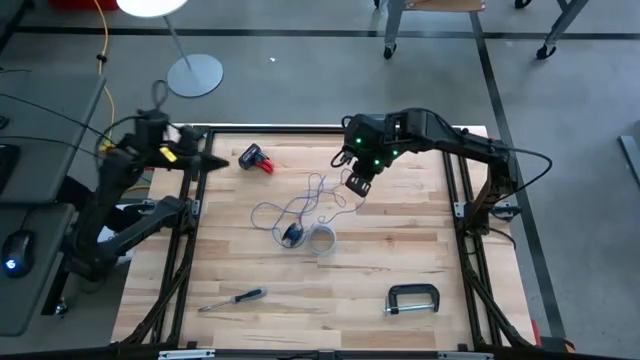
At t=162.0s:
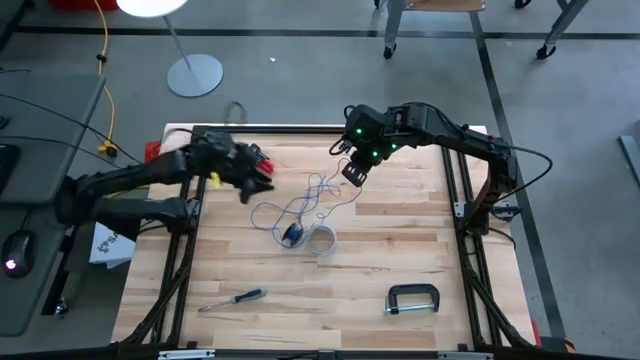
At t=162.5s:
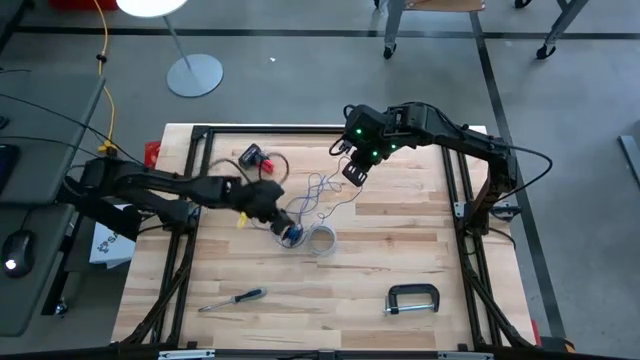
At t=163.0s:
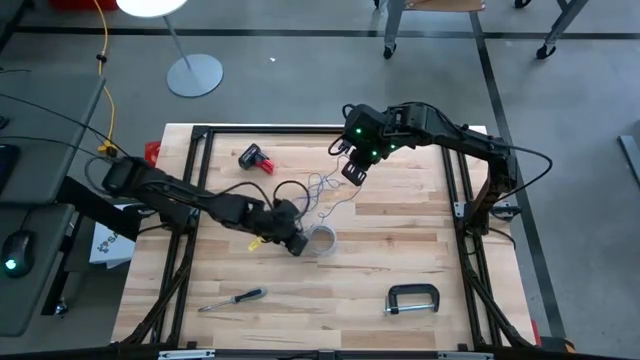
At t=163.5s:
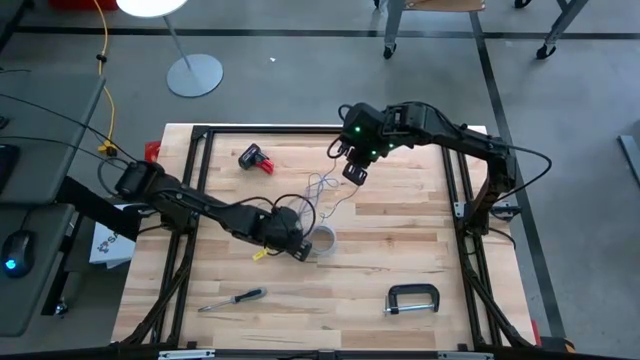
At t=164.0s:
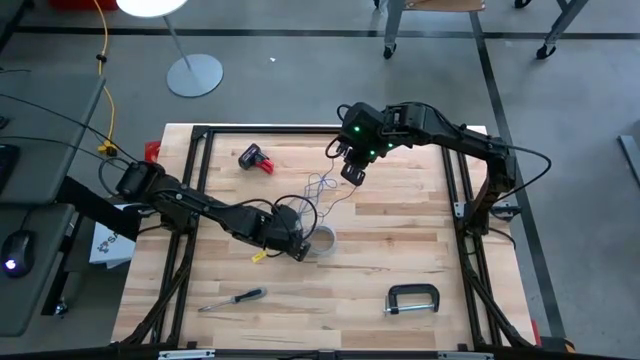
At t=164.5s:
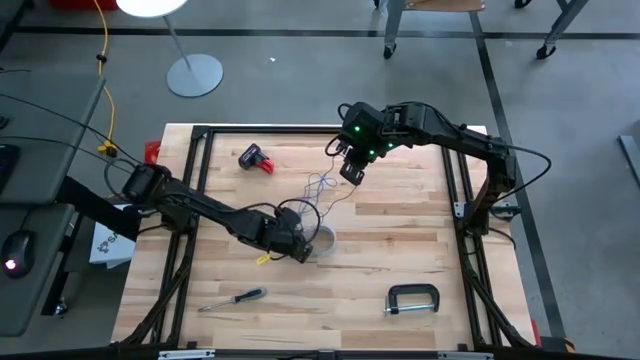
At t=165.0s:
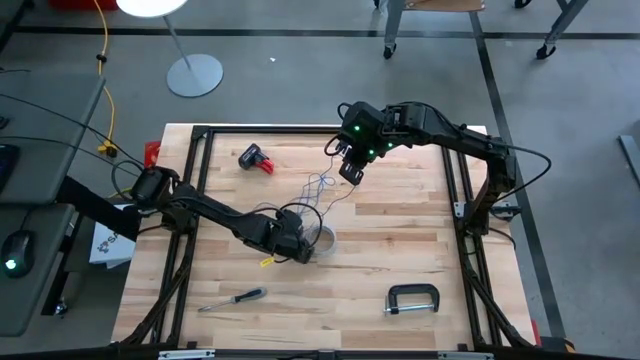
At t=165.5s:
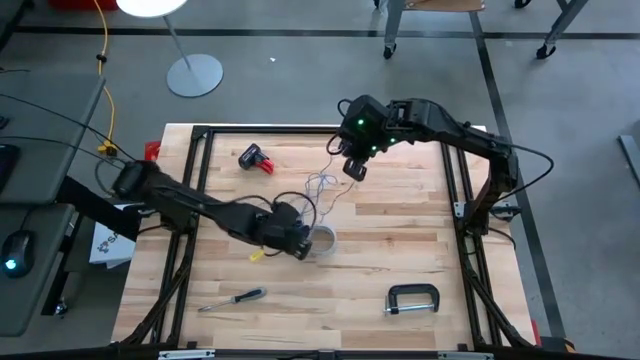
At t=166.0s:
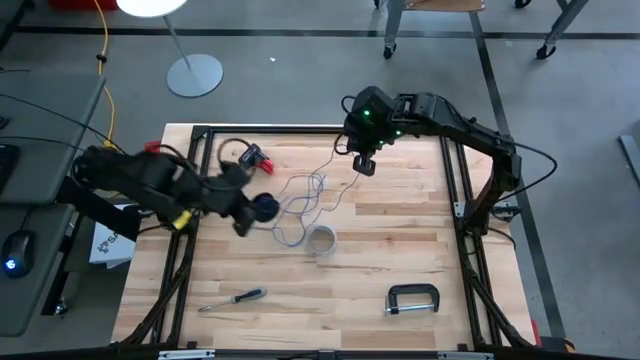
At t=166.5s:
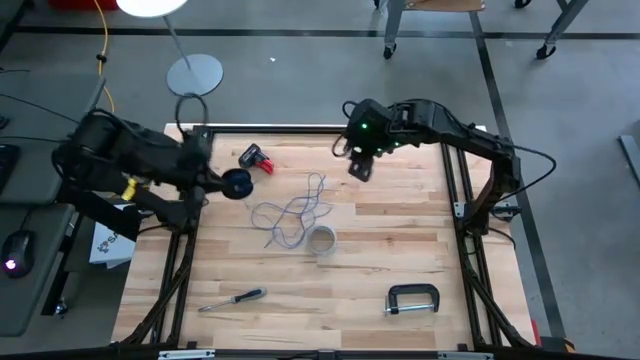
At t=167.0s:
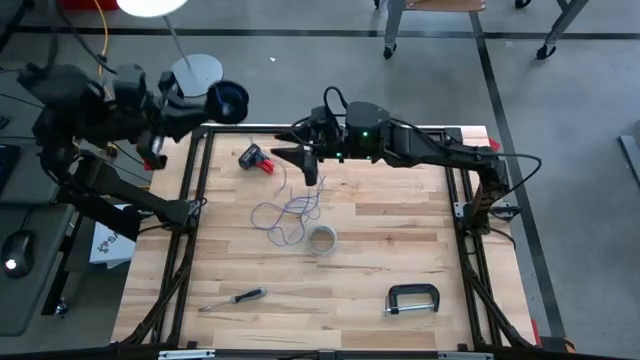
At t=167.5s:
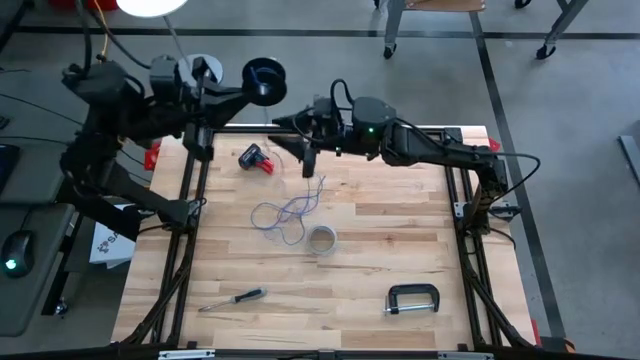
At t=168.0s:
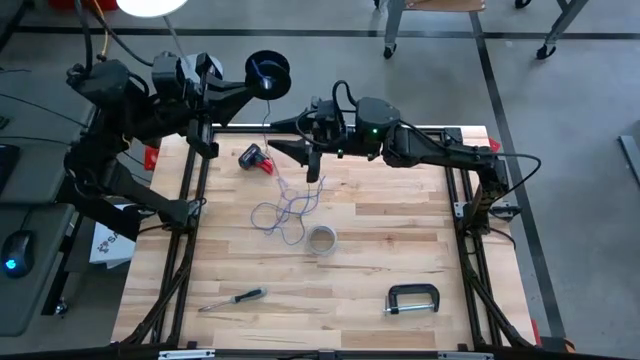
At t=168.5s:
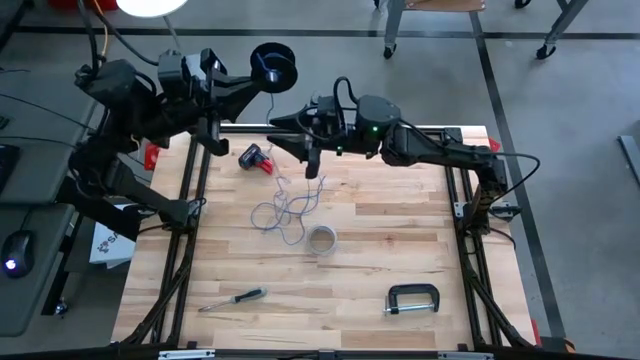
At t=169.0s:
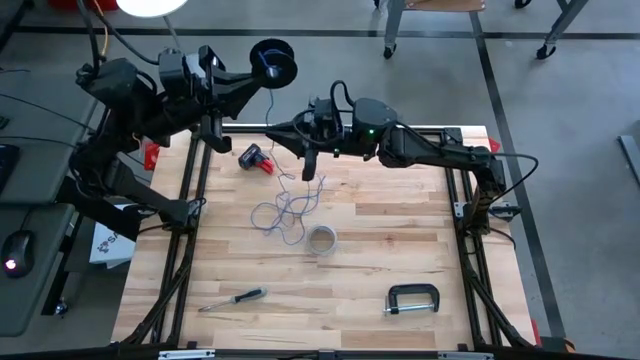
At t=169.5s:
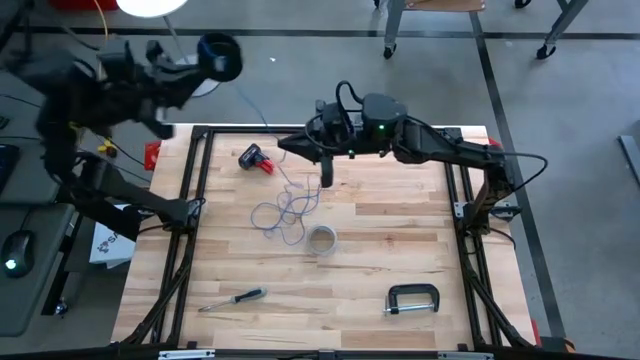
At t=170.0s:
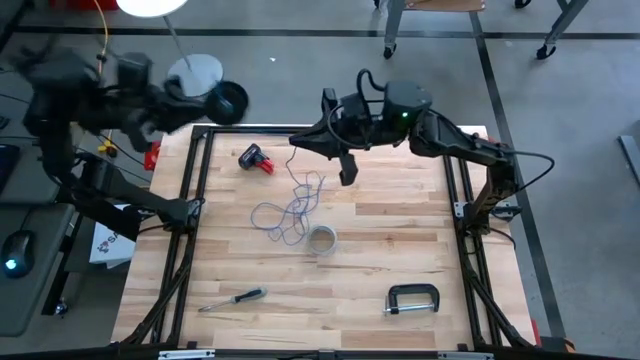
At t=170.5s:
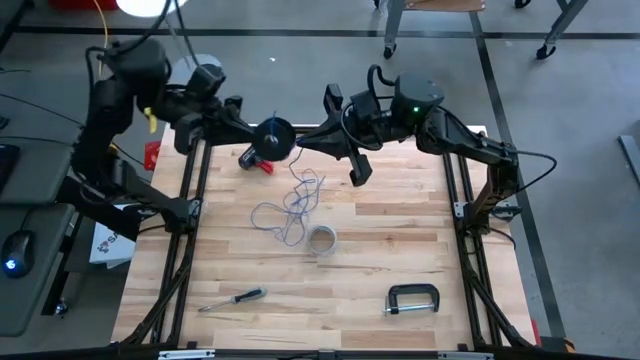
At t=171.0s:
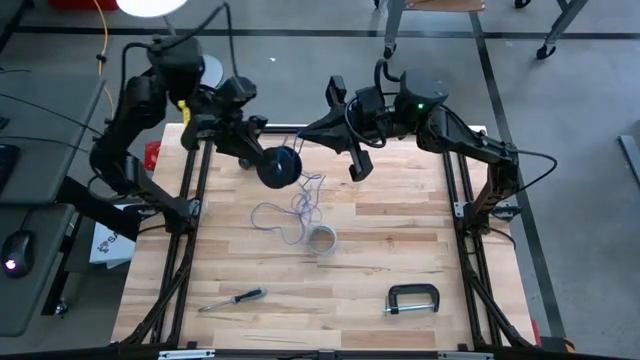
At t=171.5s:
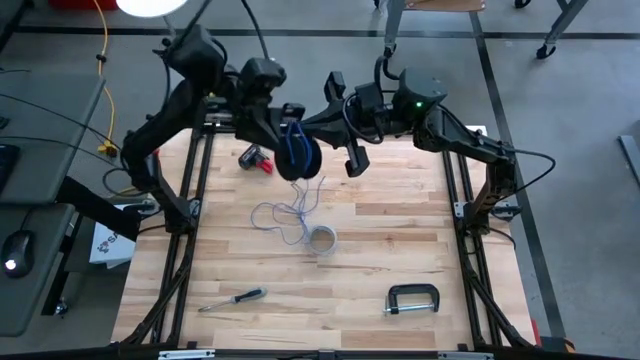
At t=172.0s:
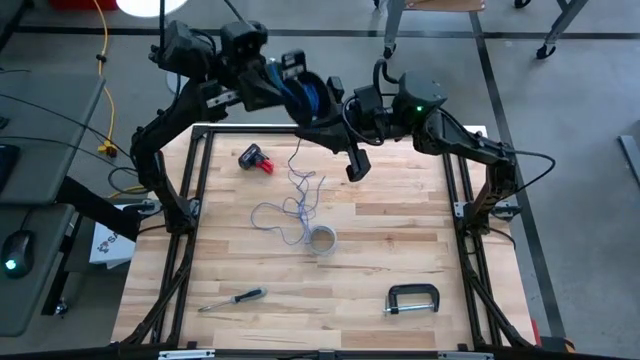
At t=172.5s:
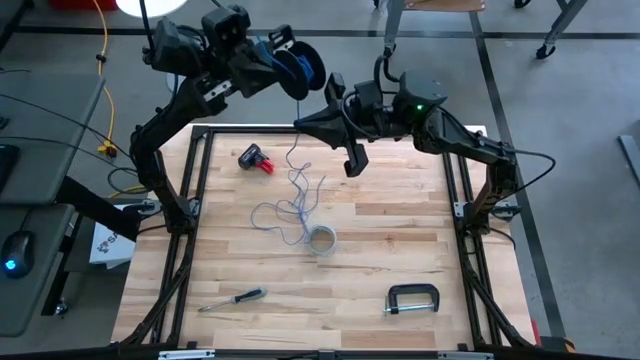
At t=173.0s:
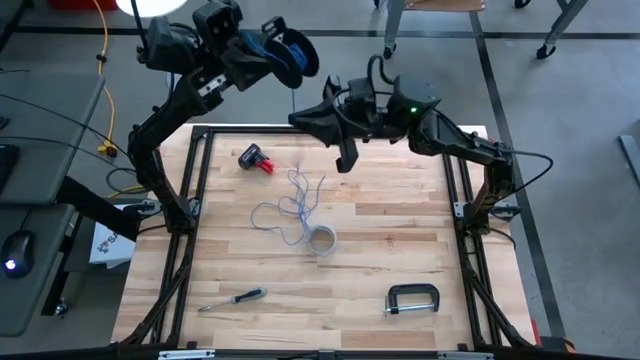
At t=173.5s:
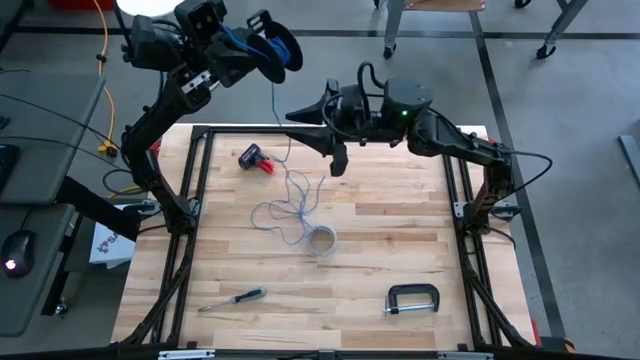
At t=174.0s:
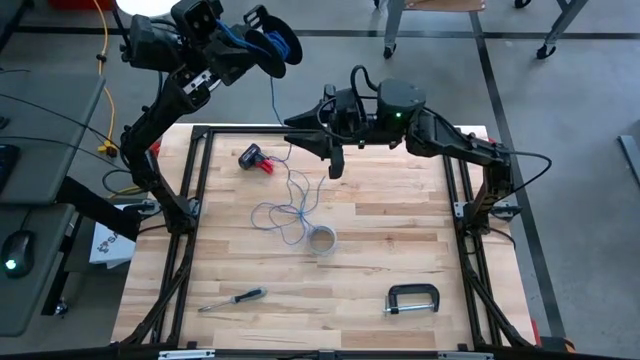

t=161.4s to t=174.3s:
Task: Coil cords
Coil the blue wire on the spool

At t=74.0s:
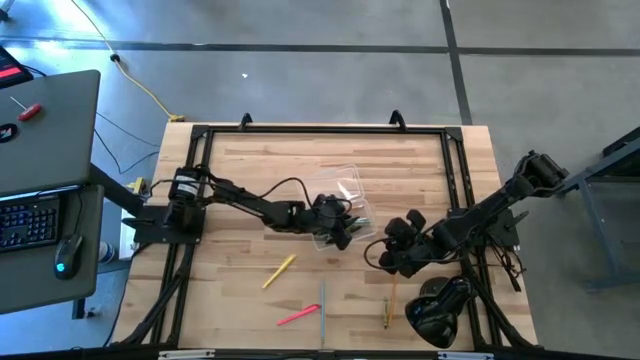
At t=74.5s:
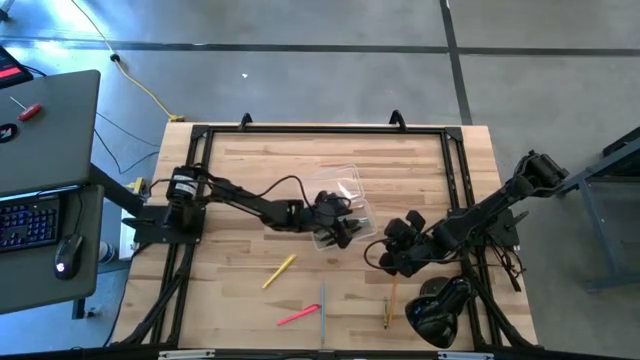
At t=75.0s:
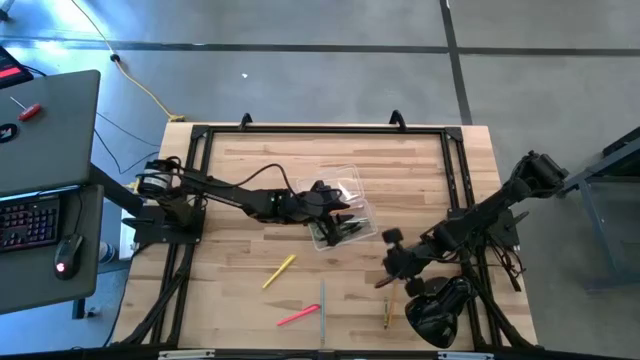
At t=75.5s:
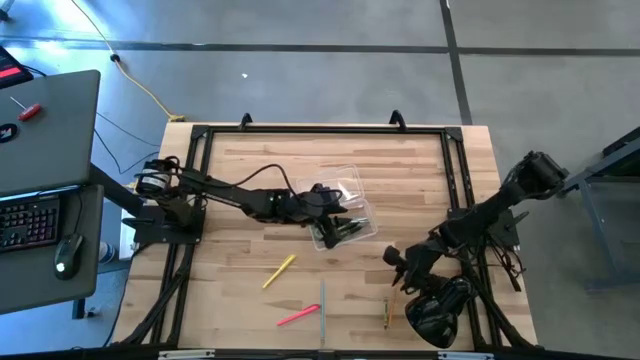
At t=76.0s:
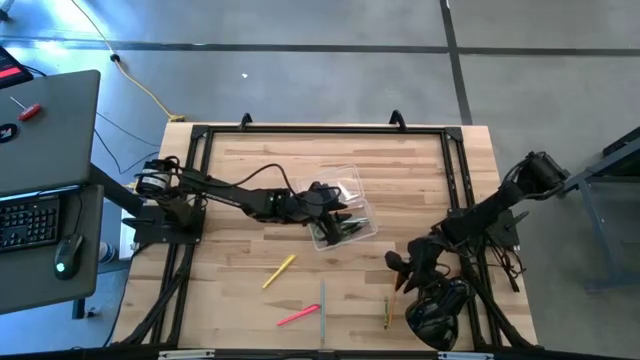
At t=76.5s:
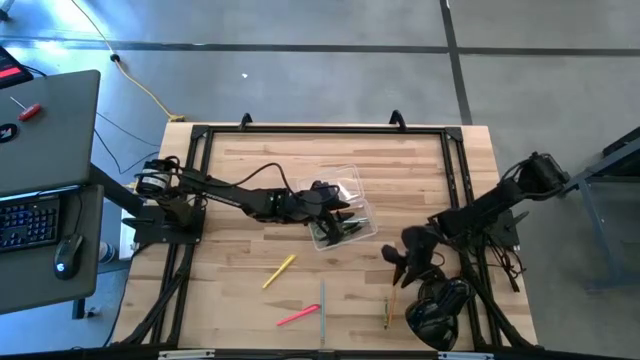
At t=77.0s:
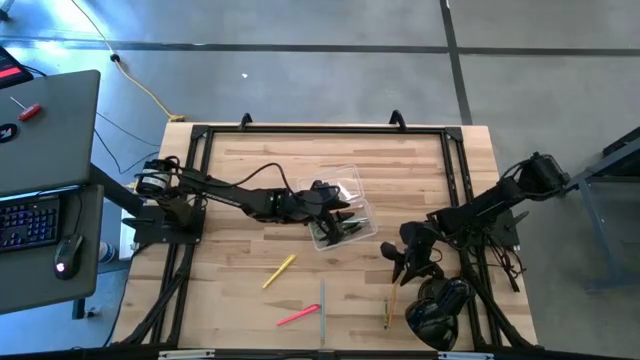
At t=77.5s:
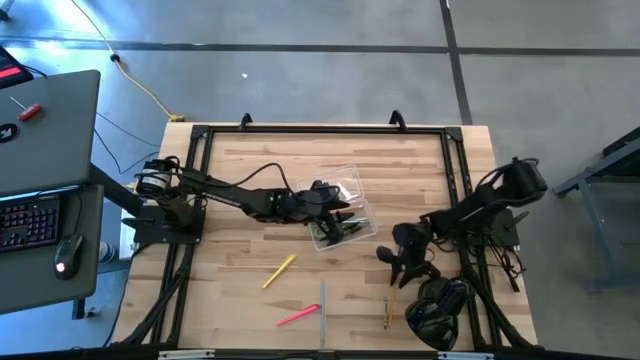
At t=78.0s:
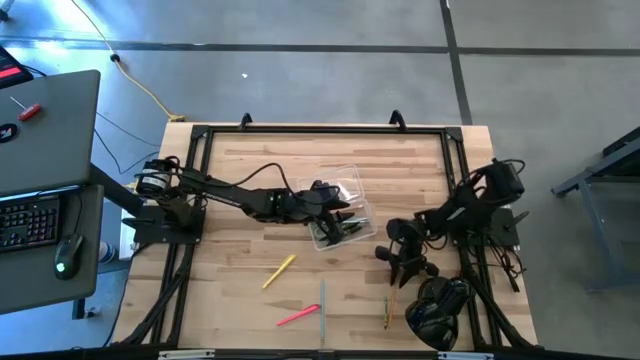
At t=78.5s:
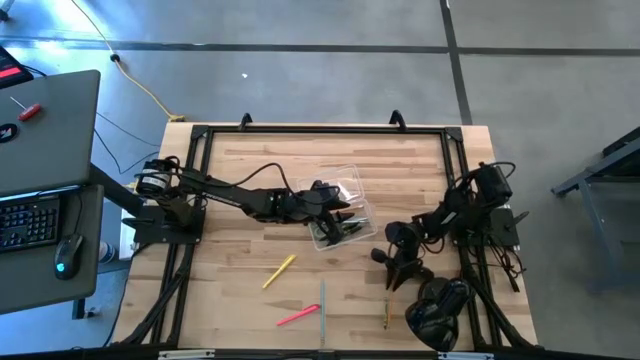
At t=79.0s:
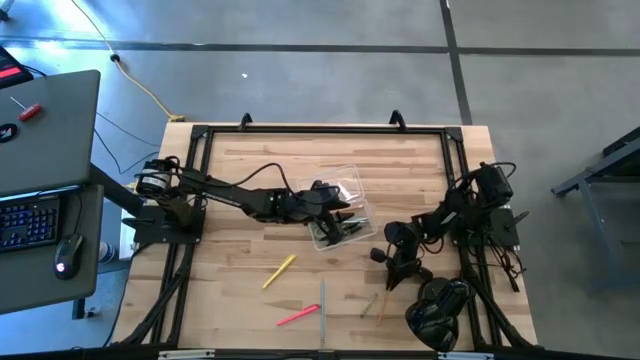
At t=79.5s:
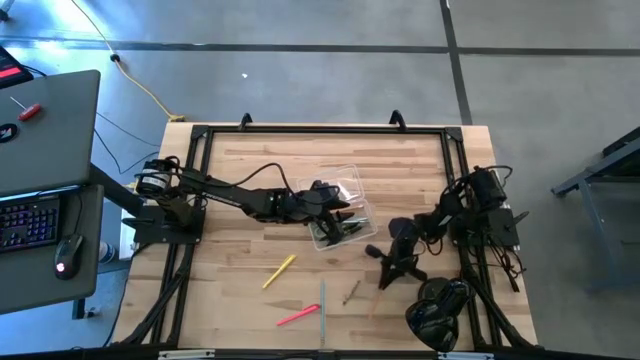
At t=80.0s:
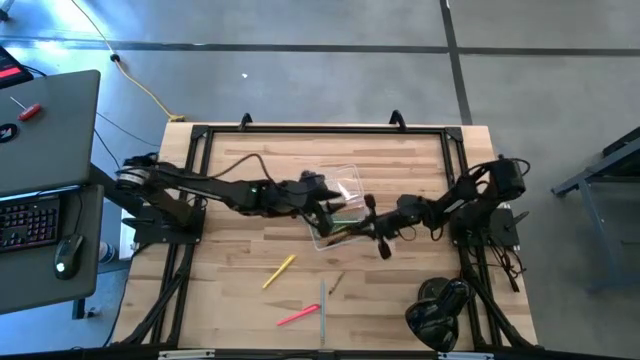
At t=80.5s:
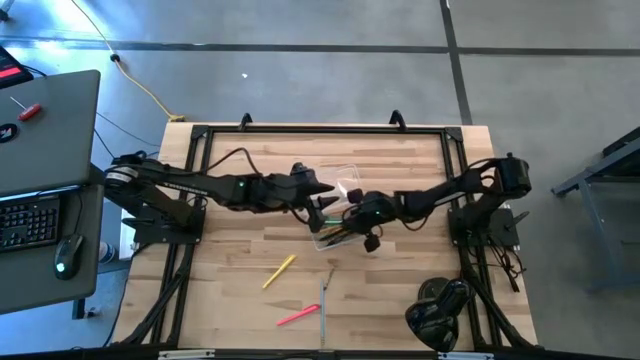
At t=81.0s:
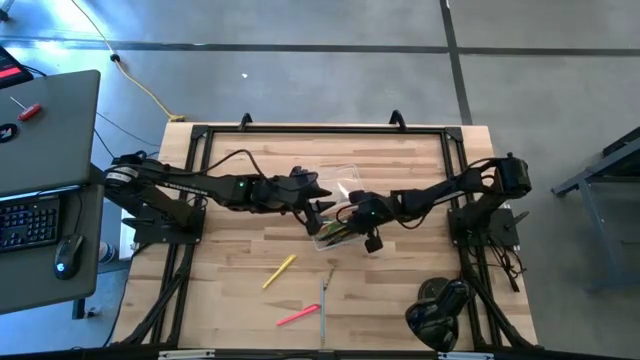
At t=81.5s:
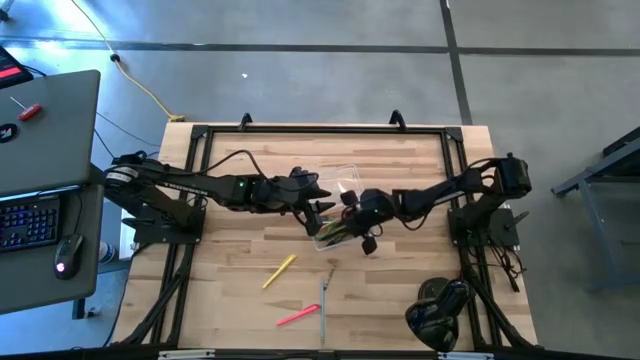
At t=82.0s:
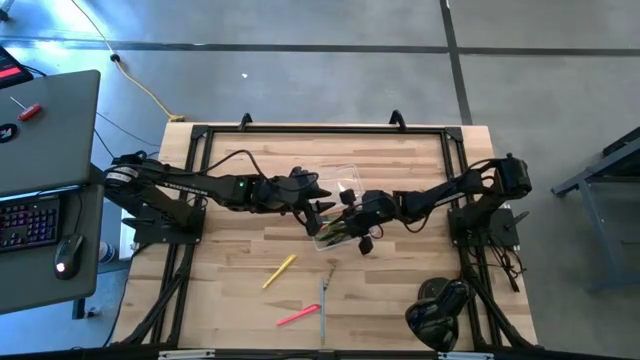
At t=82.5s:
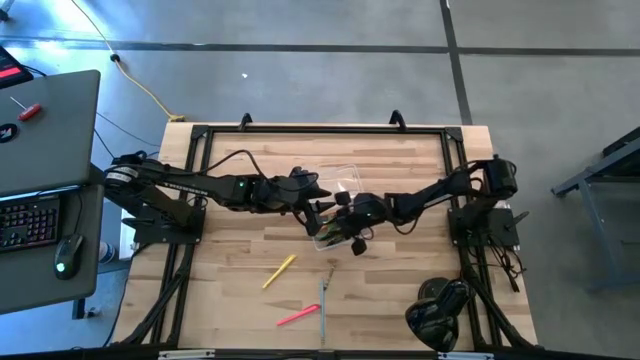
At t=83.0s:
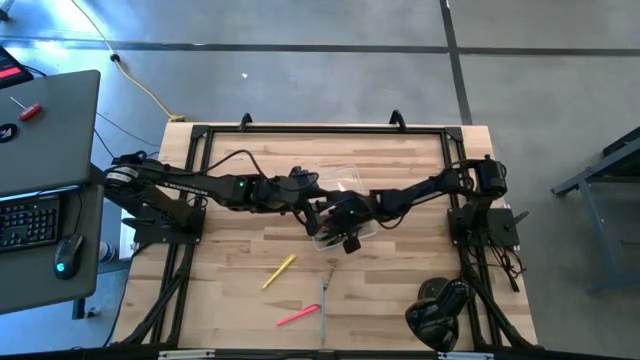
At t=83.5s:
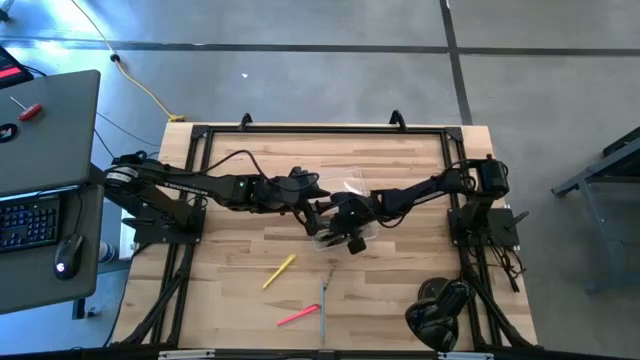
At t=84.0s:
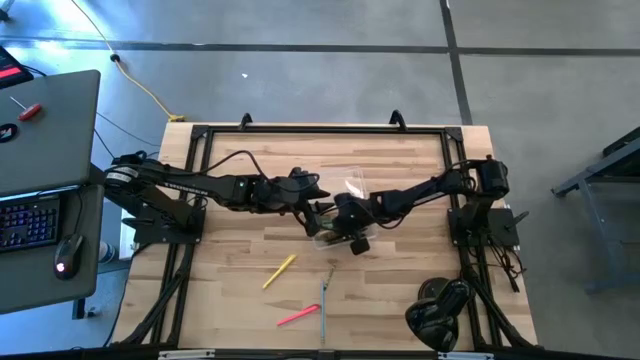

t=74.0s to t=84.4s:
Task: Pick & place school supplies into a supply box
Put the orange pencil into the supply box
